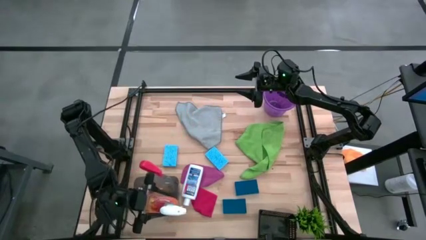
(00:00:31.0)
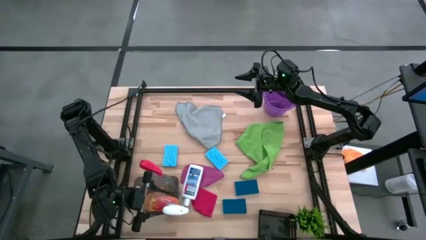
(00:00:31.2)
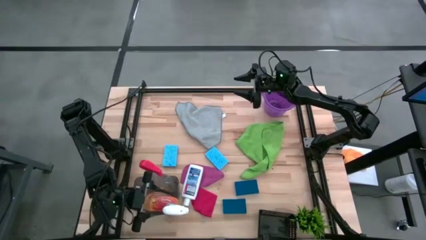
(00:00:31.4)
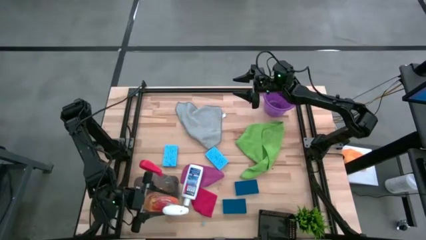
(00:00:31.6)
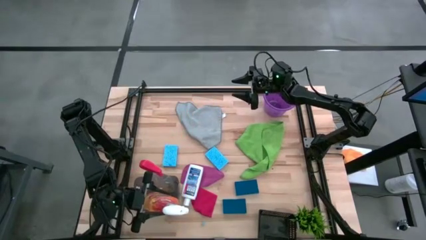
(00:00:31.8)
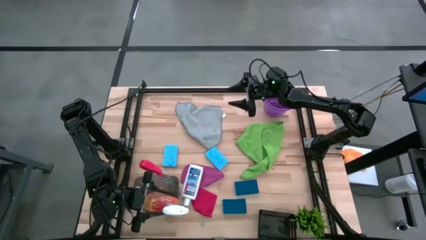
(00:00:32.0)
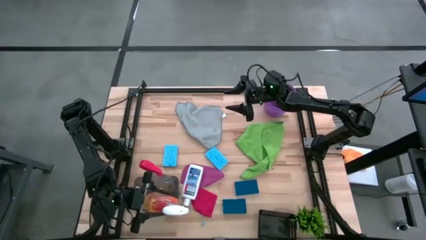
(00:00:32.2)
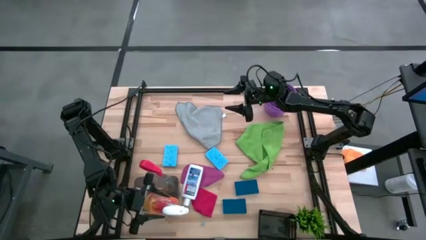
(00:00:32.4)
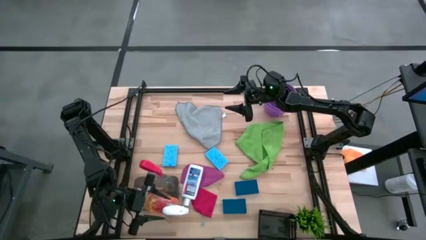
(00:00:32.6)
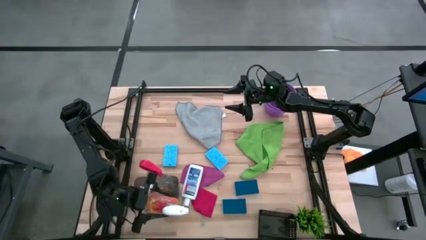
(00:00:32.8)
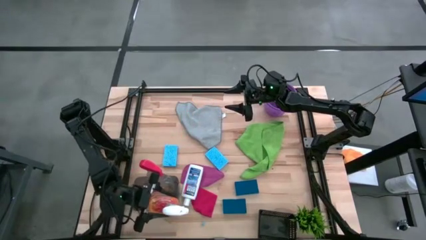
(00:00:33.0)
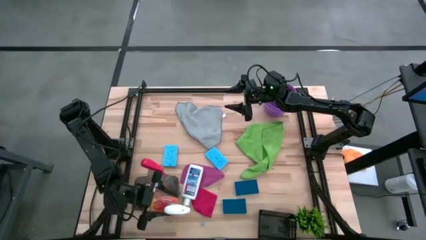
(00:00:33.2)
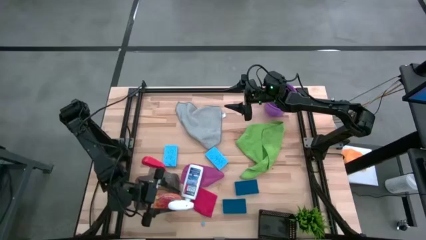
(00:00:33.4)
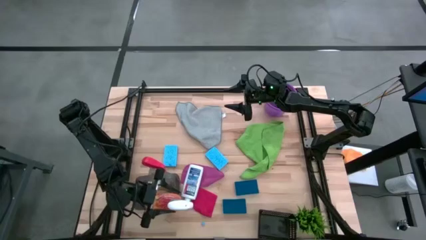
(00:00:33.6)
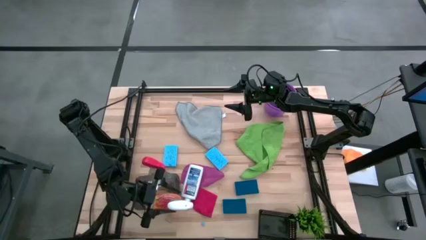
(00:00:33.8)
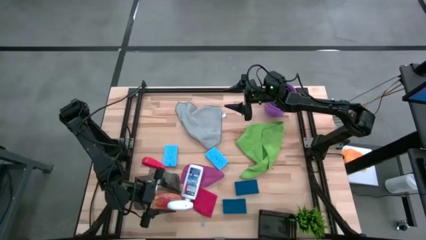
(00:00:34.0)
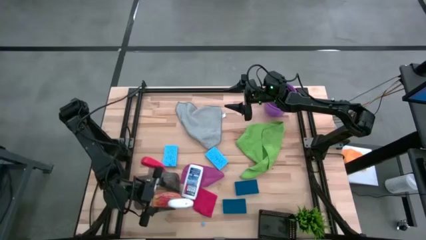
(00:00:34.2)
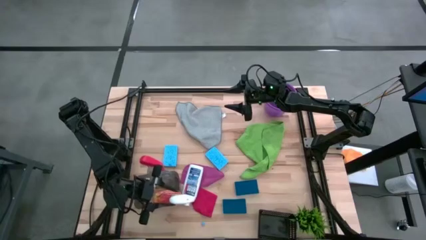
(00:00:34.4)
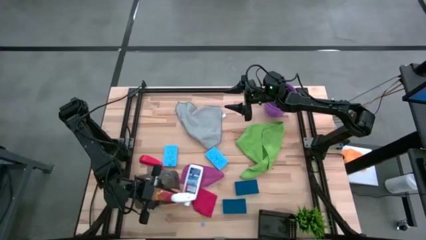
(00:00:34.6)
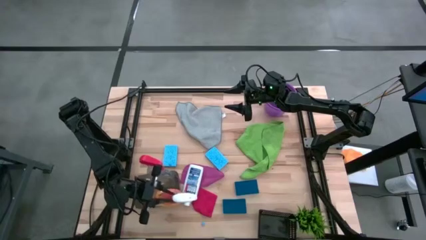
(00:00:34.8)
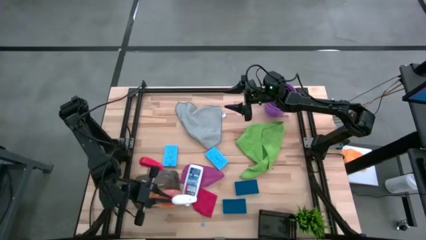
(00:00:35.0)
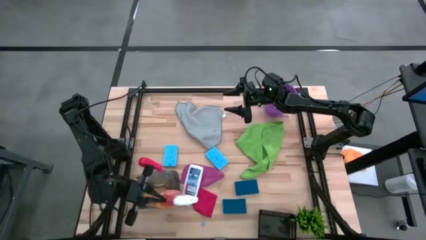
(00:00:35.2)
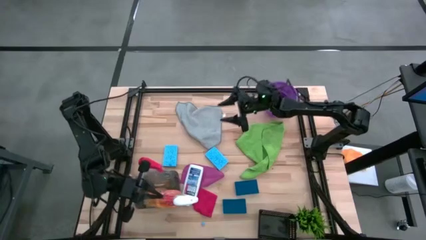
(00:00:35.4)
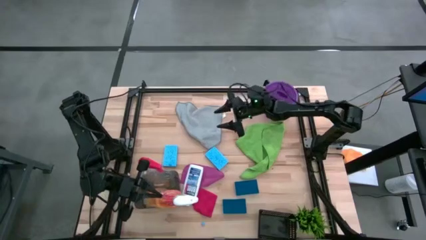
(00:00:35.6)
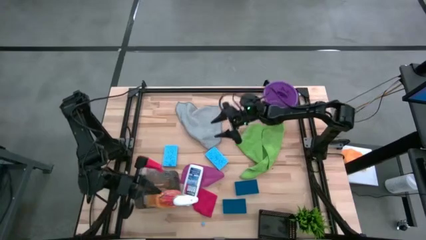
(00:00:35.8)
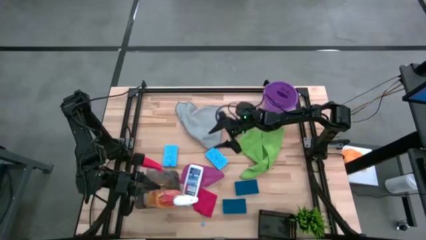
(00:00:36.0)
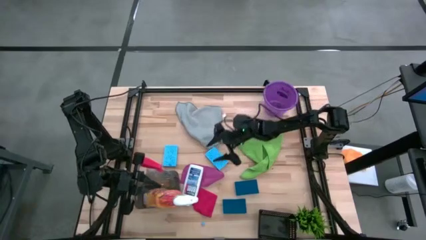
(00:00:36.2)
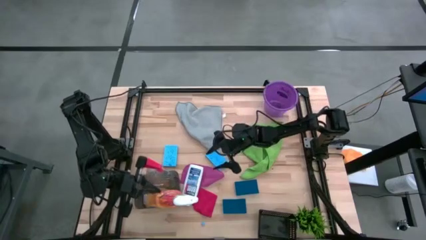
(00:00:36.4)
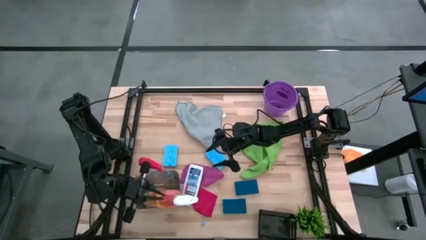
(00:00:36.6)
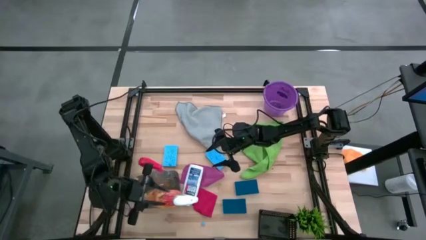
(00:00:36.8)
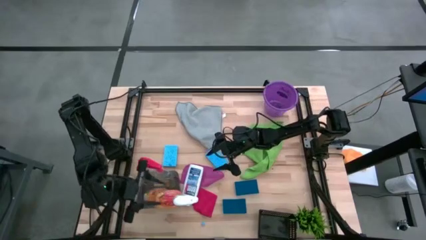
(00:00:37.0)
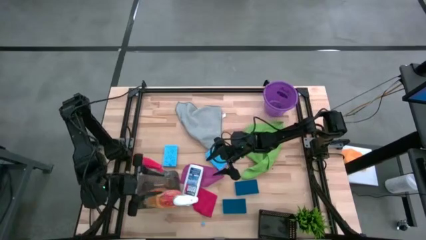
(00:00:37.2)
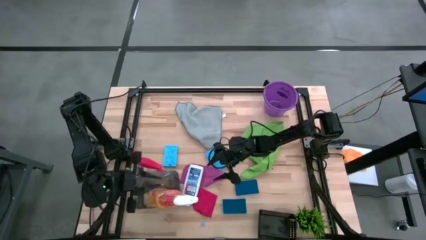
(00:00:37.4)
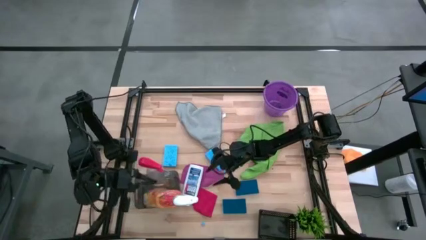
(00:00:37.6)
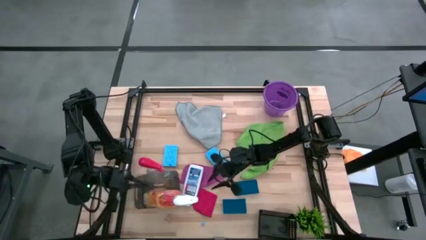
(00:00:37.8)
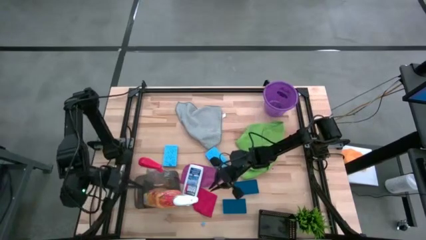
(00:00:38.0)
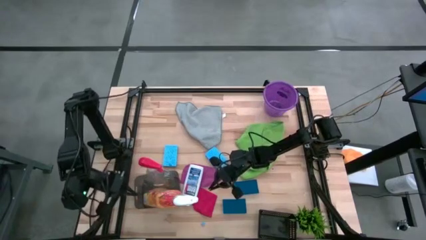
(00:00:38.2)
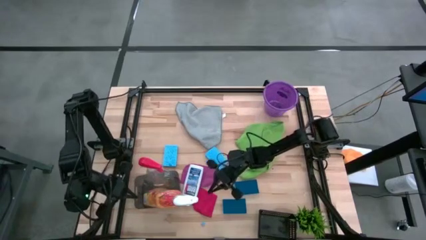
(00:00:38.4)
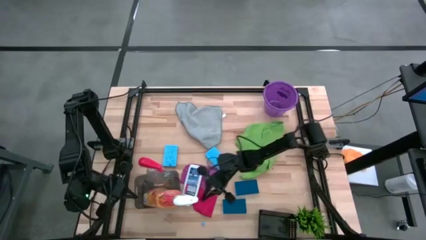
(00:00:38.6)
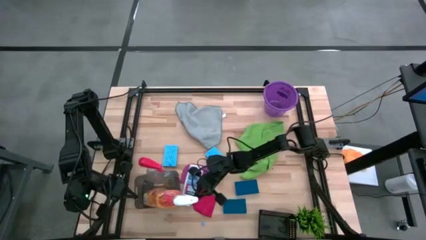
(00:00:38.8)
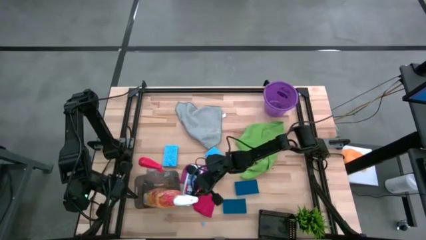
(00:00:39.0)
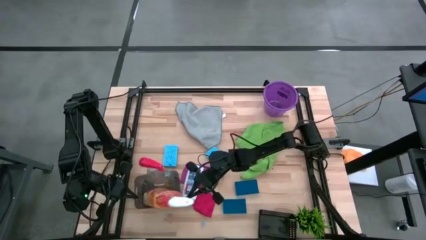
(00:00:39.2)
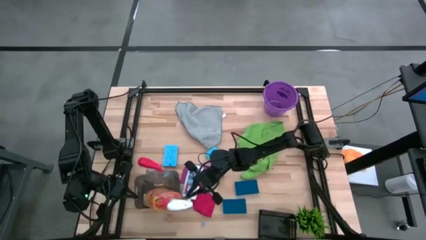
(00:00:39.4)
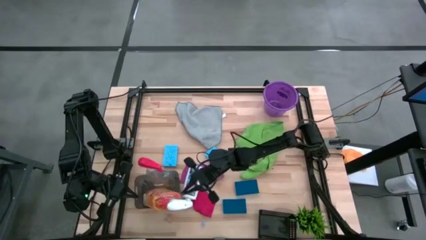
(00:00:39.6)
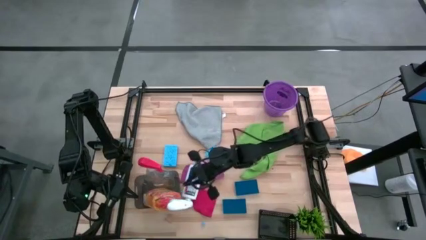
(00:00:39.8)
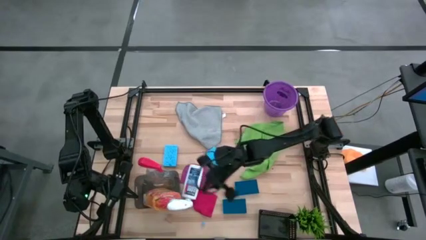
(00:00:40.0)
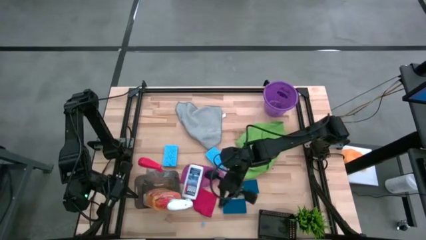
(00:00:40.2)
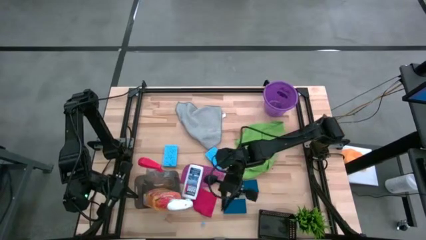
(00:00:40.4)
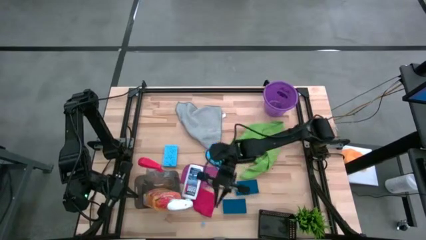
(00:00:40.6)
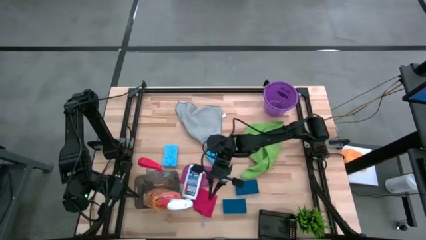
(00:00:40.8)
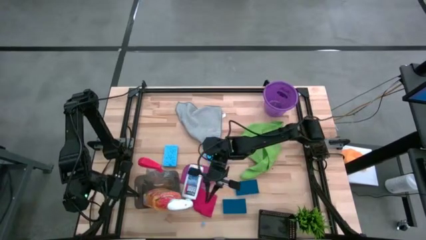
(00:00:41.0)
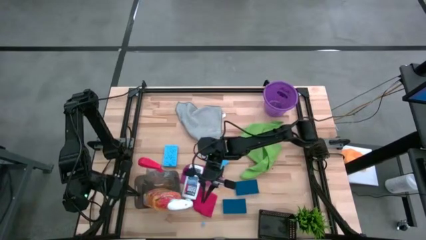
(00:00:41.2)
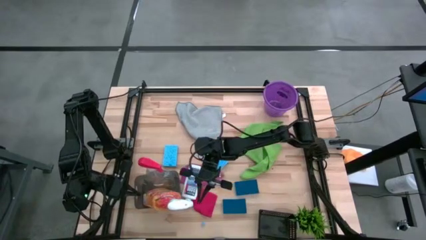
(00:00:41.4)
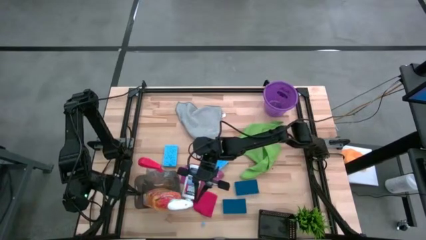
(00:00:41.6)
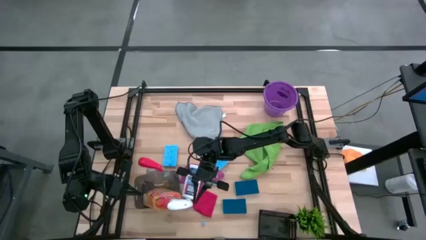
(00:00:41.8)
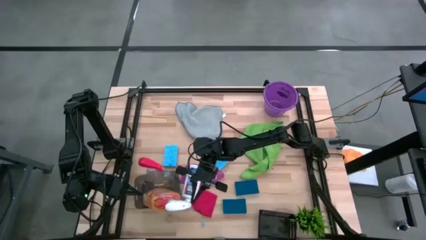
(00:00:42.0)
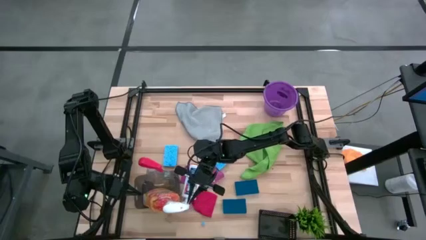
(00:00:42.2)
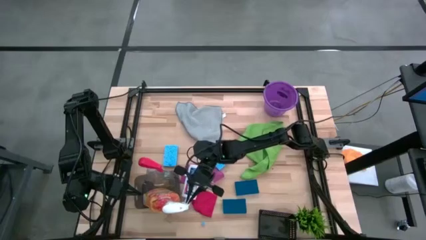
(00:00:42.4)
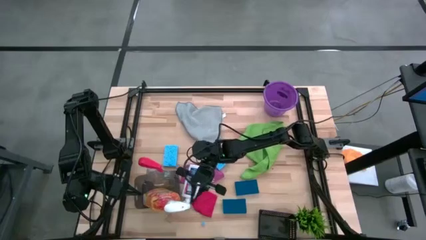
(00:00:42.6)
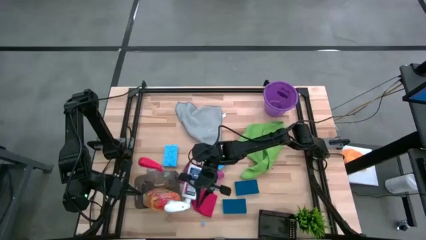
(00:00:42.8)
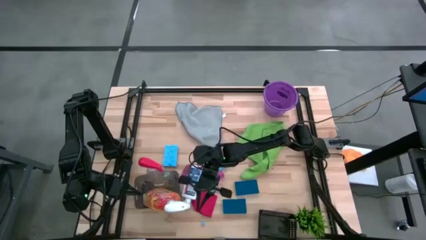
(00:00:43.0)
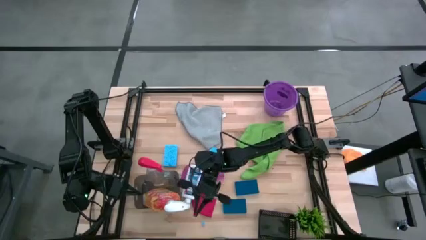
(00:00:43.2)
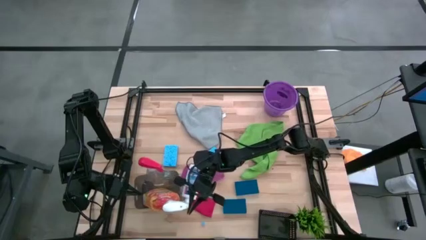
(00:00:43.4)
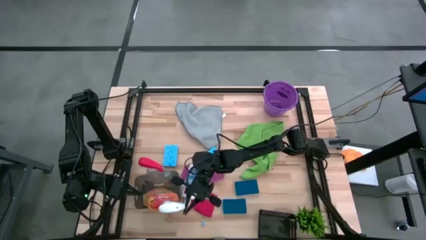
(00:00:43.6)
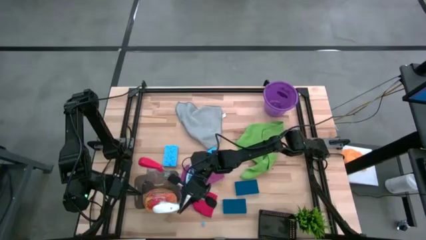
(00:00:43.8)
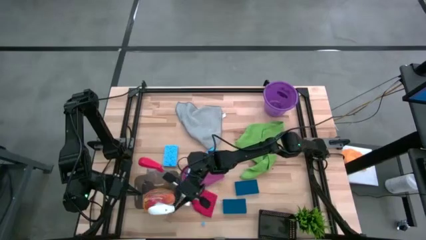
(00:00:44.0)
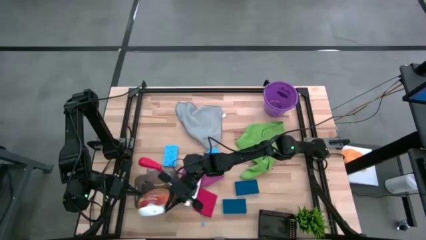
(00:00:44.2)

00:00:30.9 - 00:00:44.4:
Task: Pick & Place Kitchen Items
Put the orange spray bottle into the gray bin
